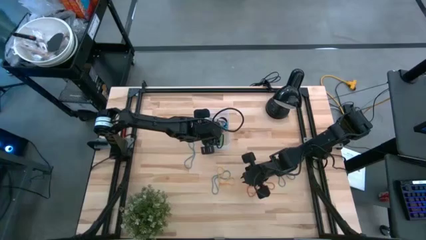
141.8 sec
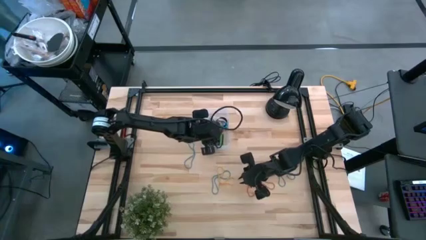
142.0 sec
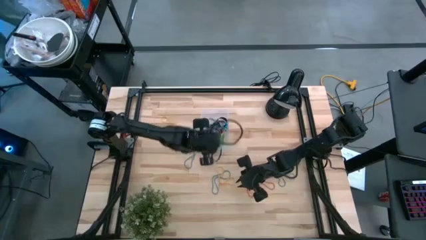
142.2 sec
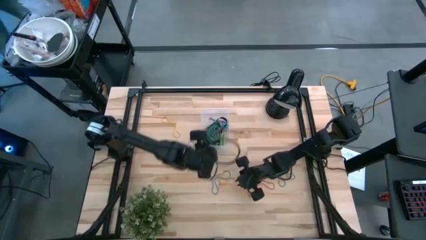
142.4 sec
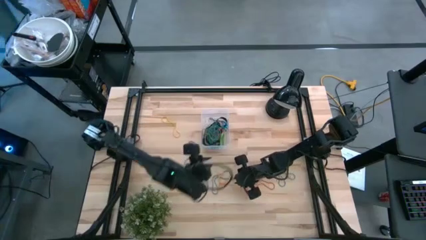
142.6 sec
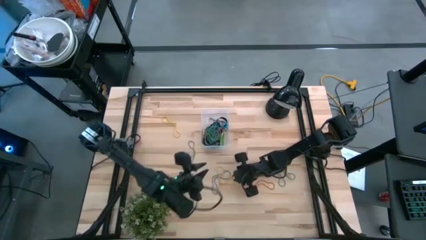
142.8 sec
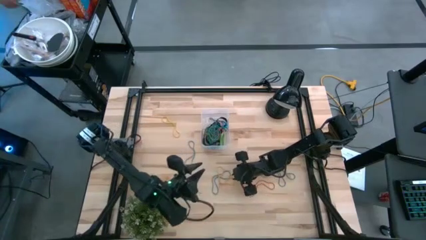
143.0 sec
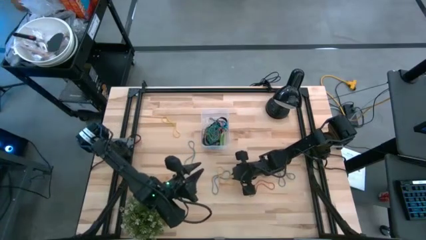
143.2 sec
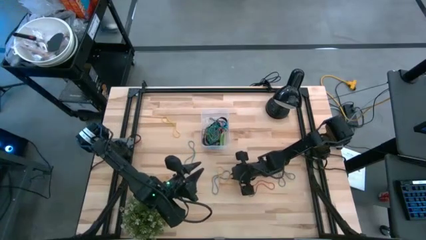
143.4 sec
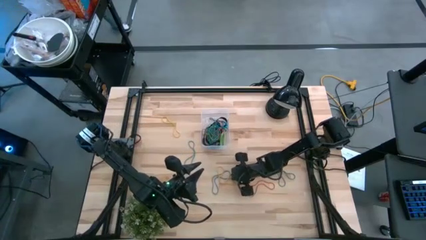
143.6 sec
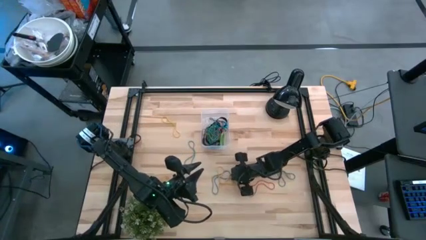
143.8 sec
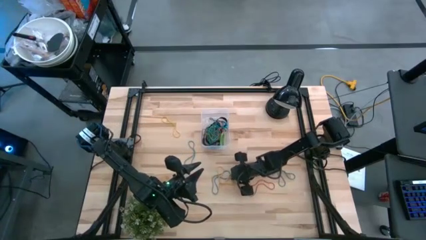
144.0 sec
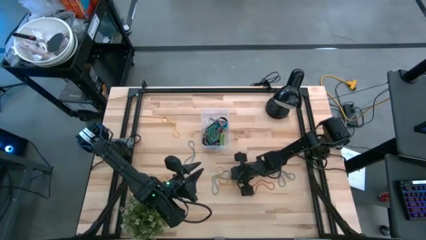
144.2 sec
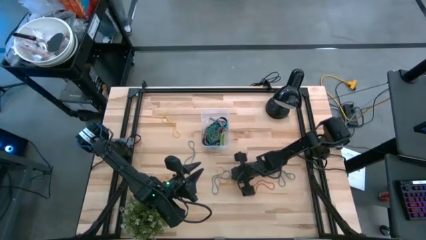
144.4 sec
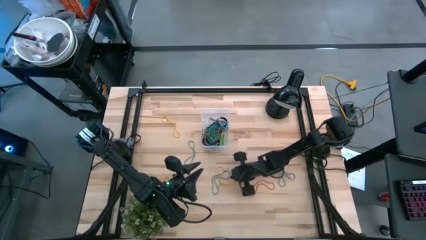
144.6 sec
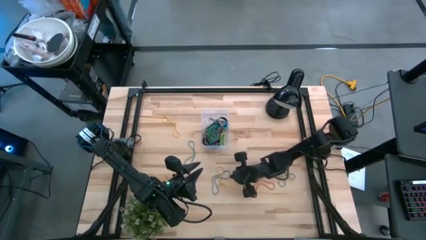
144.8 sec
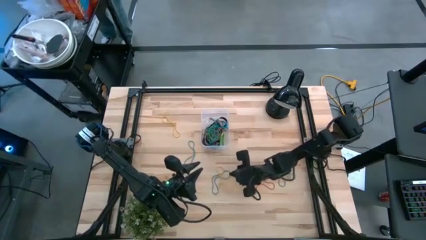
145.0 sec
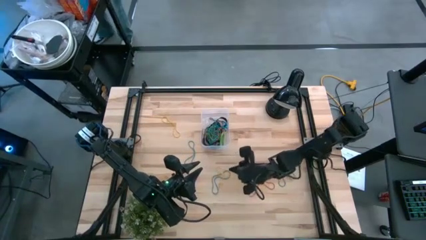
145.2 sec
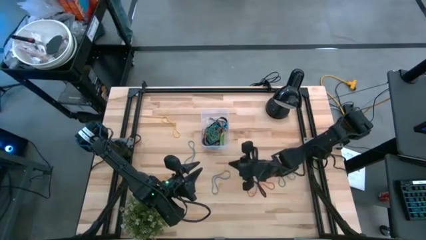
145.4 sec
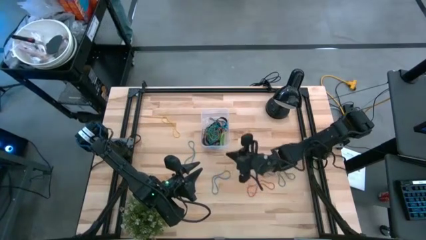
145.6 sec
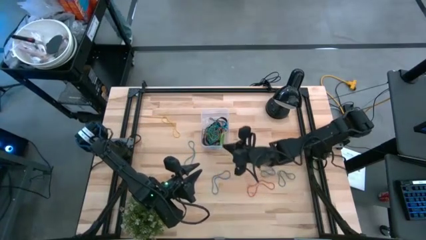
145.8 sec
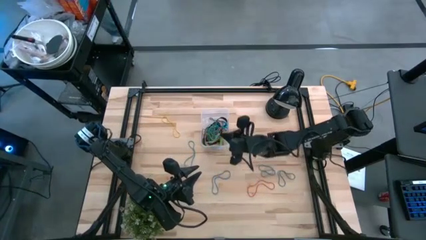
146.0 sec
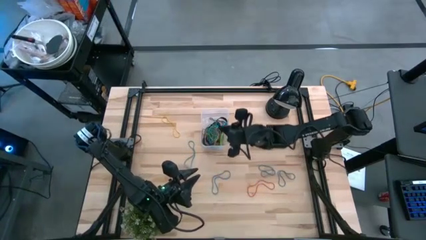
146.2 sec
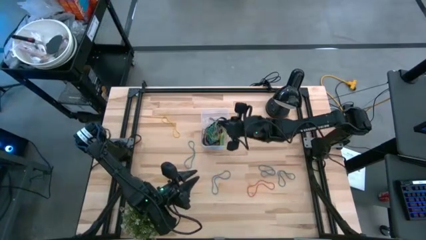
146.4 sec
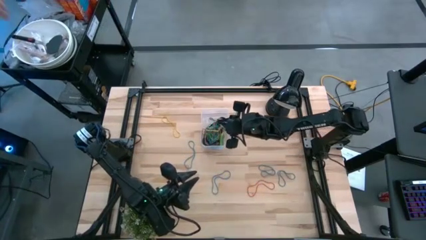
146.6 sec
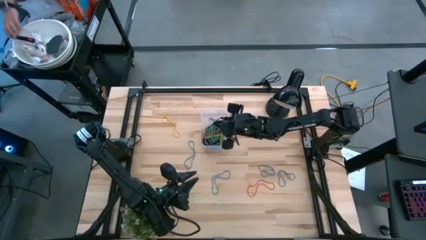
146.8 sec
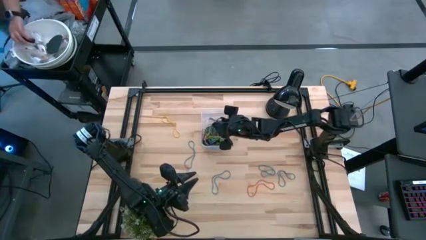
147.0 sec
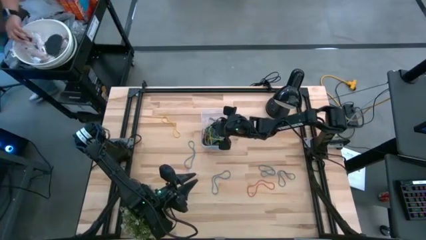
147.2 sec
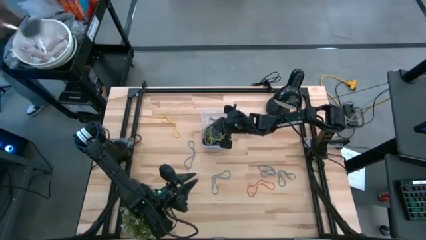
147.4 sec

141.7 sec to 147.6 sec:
Task: Pick and place rubber bands into bin
Put the yellow rubber band into the transparent bin

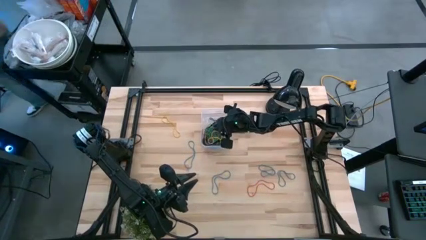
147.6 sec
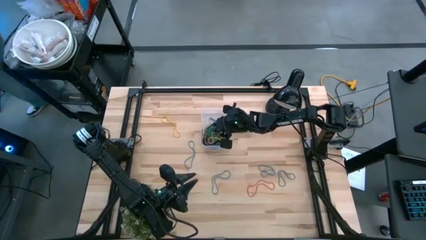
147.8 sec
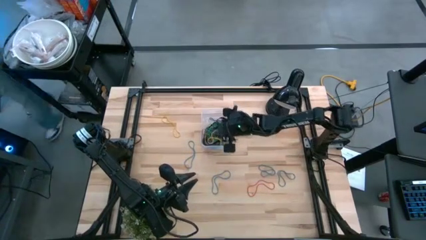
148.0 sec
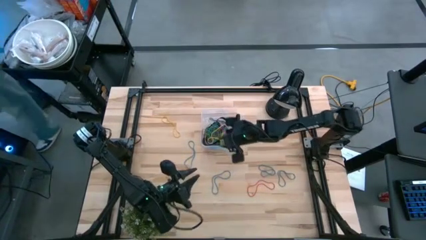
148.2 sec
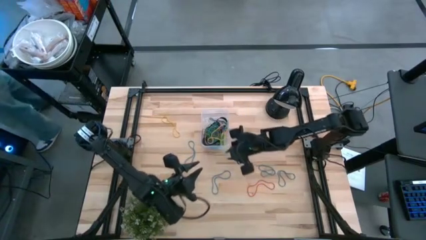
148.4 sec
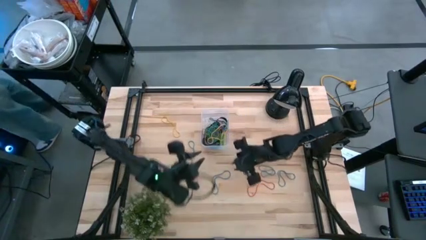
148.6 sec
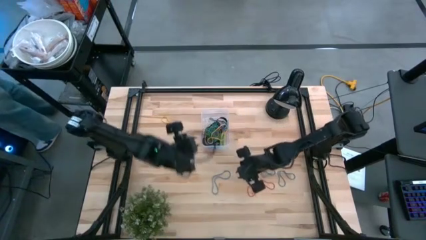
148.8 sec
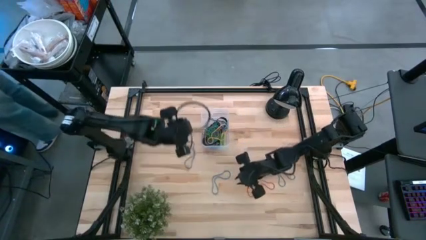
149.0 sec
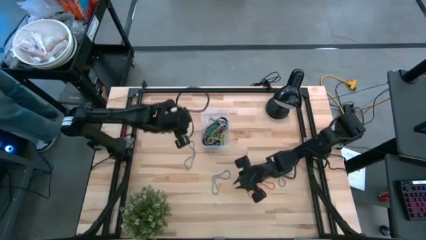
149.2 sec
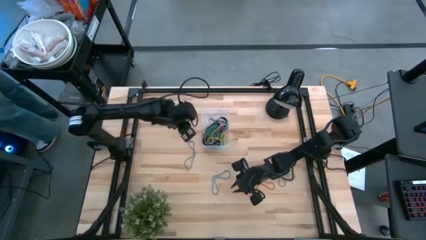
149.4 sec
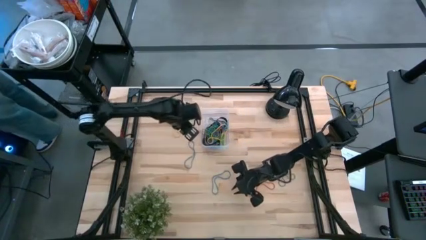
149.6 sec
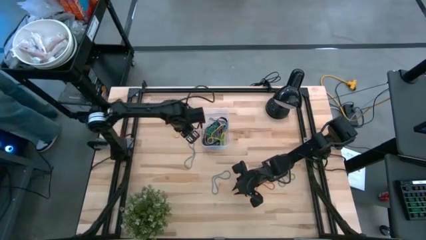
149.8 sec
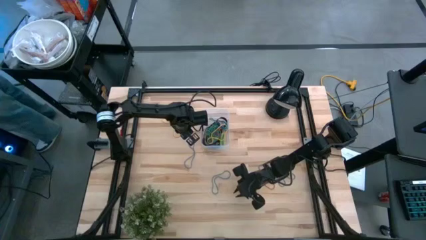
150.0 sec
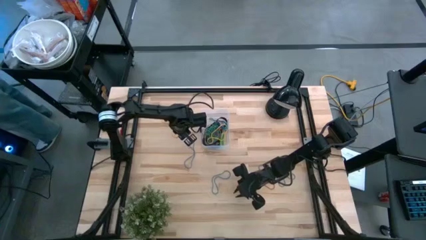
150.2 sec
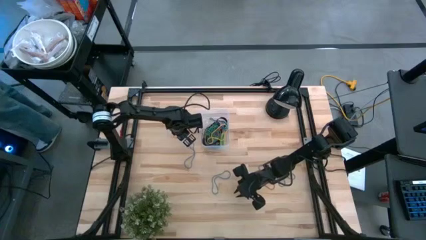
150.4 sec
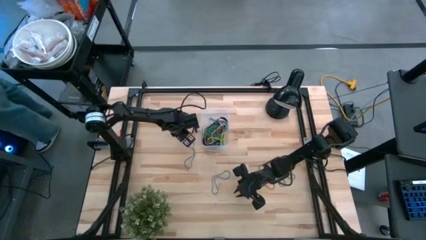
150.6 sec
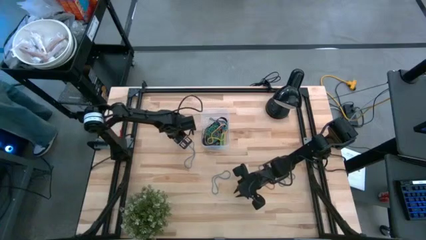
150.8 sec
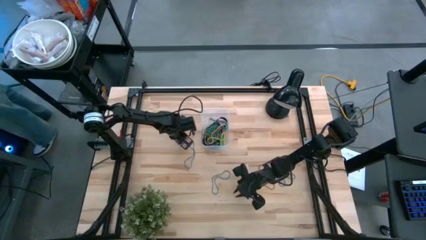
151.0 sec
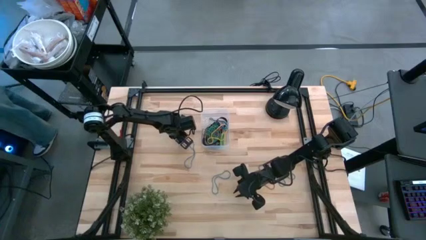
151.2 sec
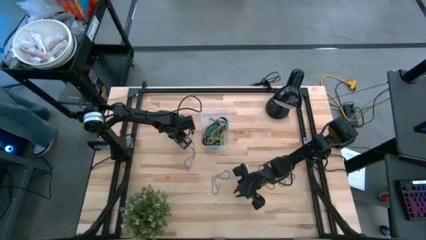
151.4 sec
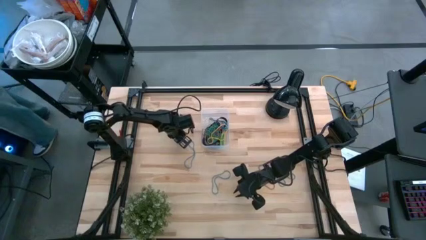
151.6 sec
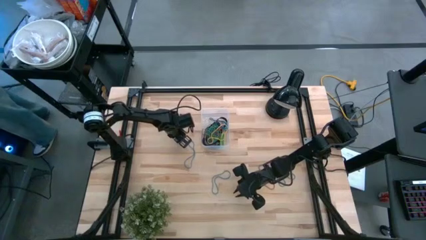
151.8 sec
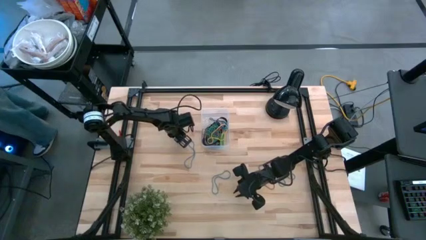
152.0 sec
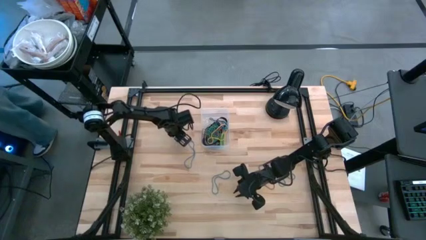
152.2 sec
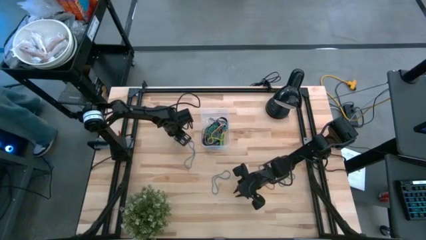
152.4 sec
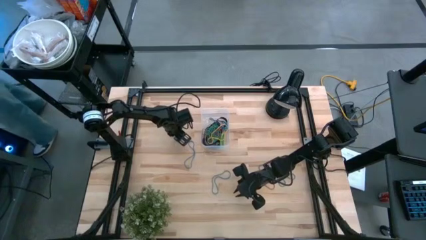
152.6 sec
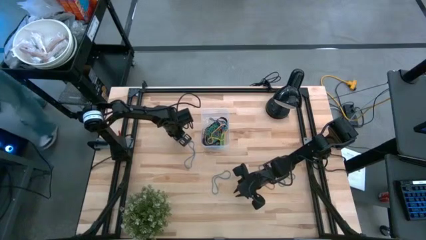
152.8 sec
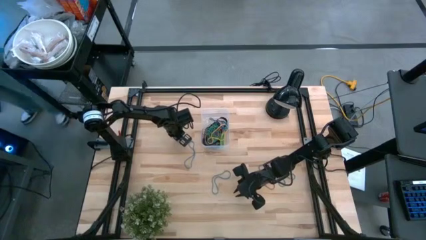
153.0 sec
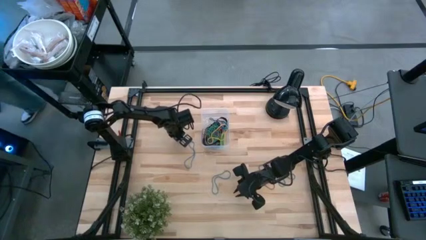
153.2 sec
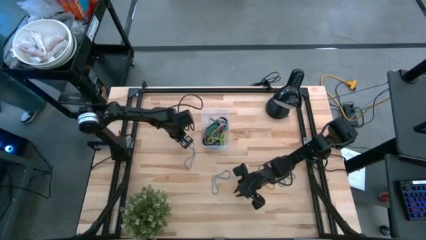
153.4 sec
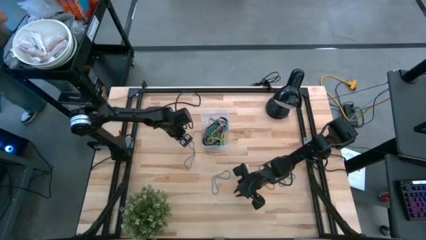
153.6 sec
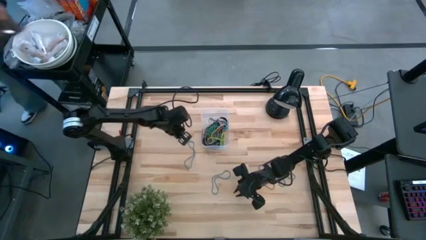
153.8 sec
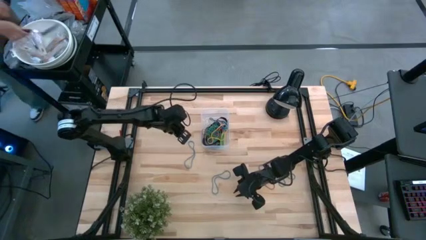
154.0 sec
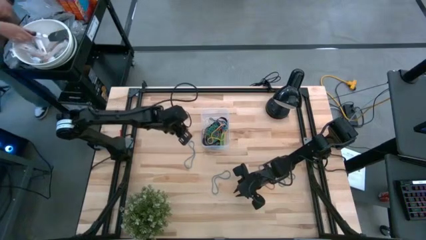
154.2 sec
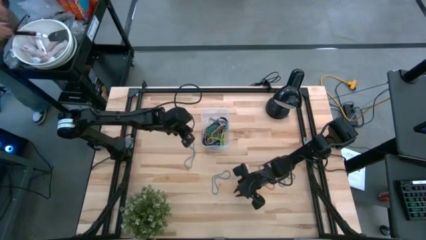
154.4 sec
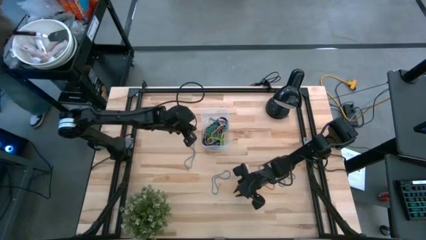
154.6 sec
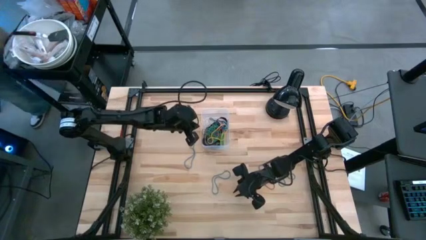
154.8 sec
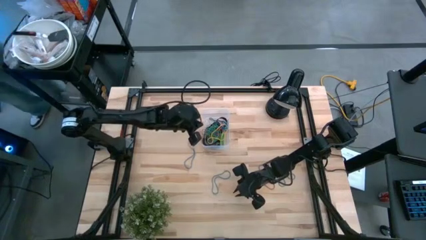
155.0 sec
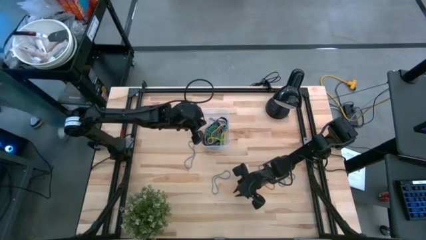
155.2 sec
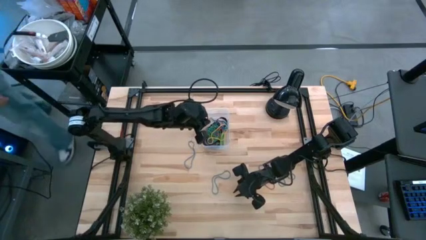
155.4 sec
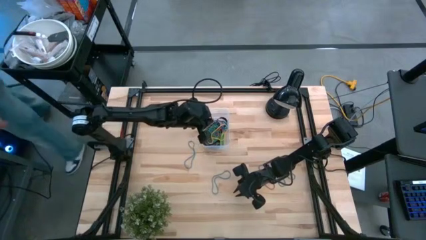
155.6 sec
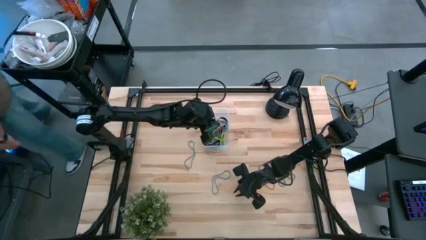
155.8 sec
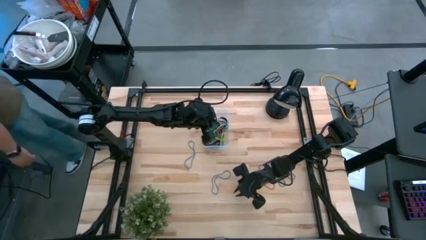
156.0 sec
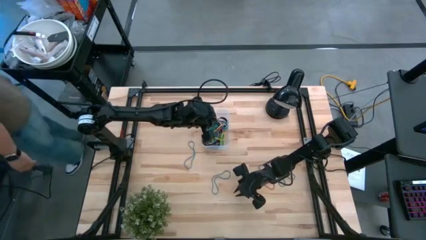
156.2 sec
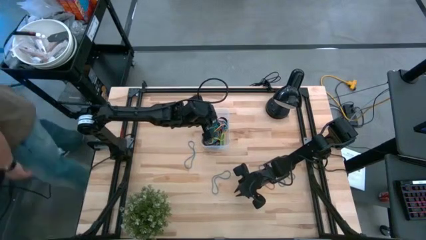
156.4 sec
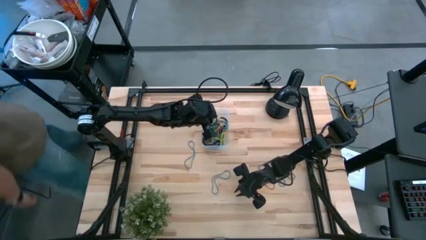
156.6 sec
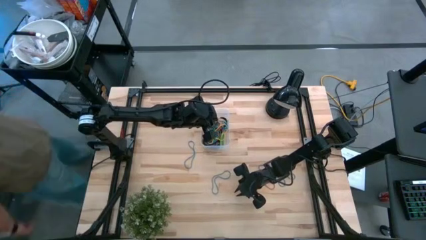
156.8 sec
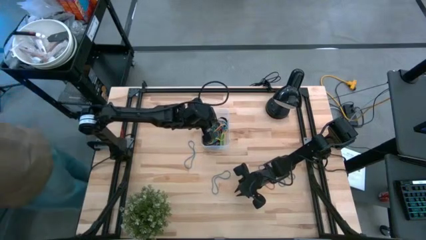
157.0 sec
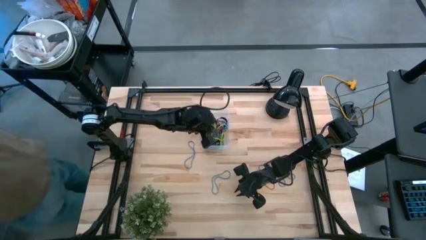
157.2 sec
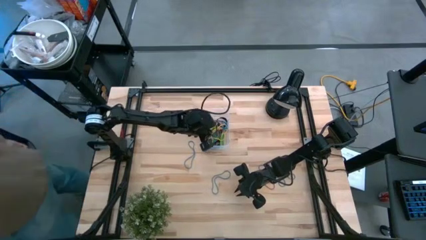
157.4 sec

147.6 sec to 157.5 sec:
Put the yellow rubber band into the transparent bin
